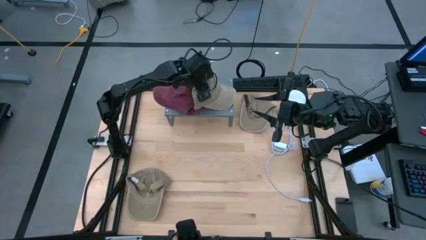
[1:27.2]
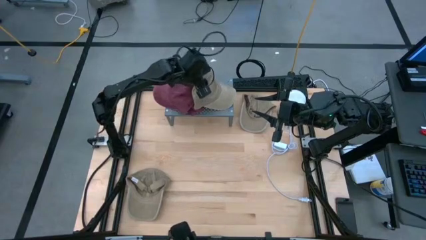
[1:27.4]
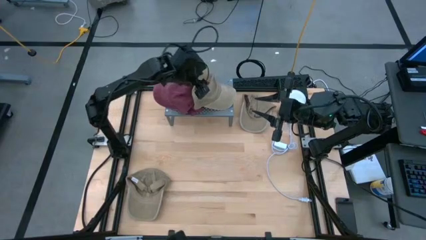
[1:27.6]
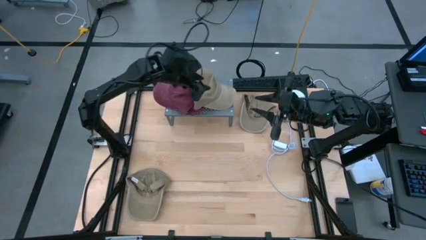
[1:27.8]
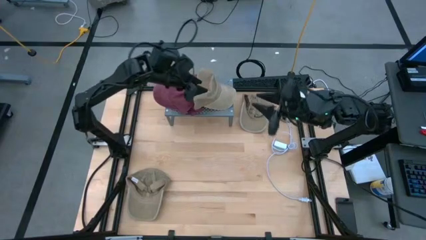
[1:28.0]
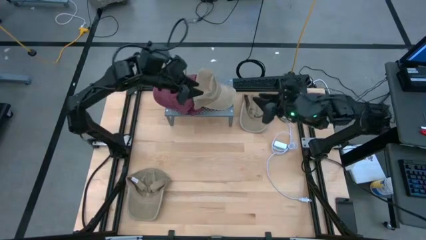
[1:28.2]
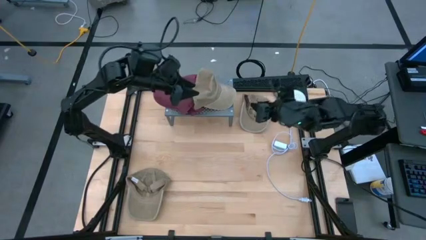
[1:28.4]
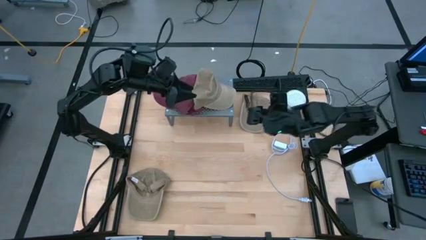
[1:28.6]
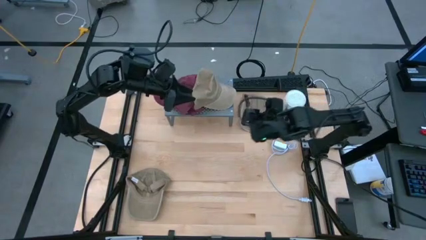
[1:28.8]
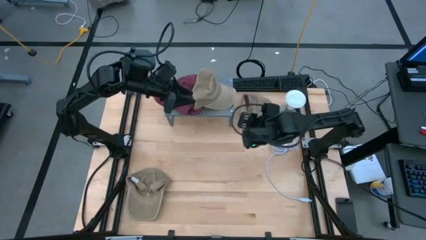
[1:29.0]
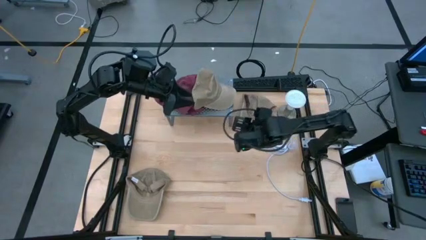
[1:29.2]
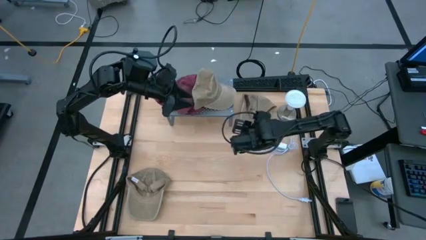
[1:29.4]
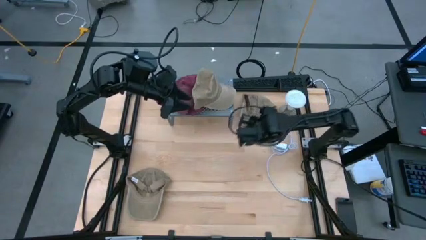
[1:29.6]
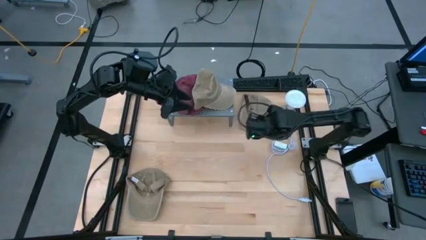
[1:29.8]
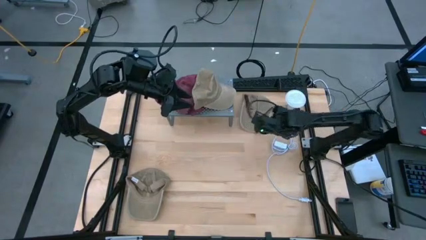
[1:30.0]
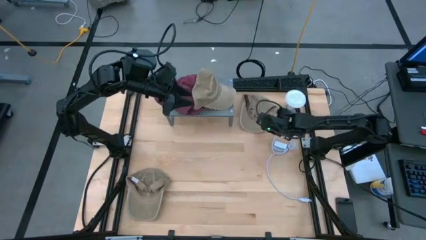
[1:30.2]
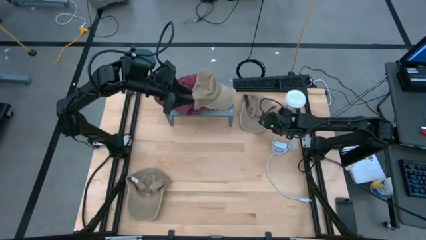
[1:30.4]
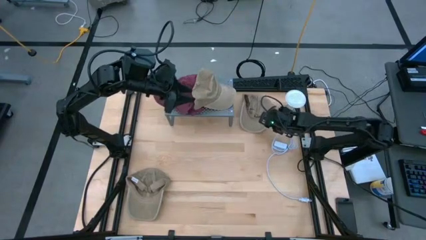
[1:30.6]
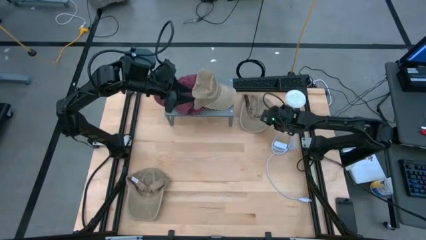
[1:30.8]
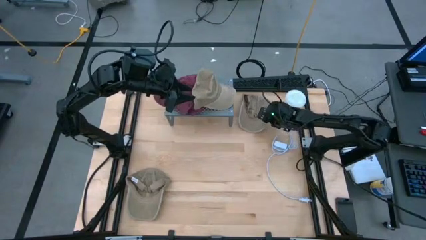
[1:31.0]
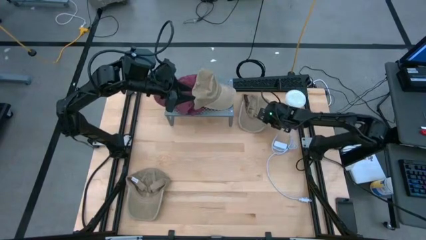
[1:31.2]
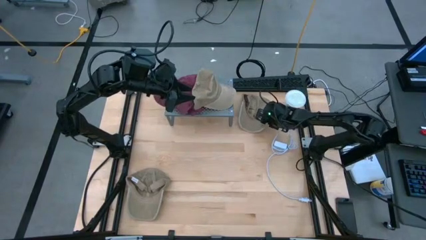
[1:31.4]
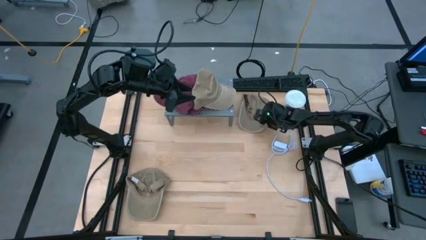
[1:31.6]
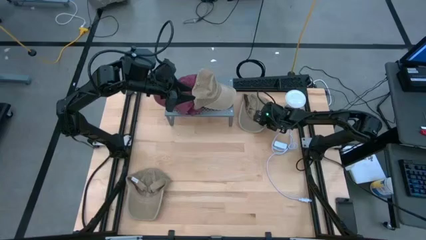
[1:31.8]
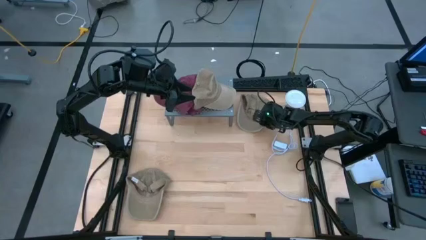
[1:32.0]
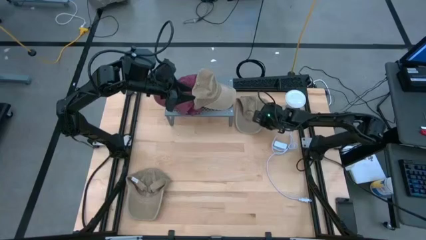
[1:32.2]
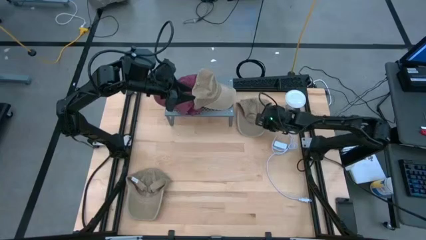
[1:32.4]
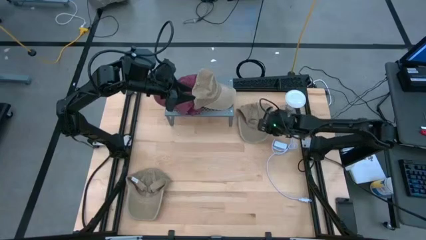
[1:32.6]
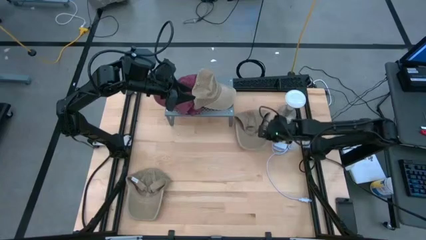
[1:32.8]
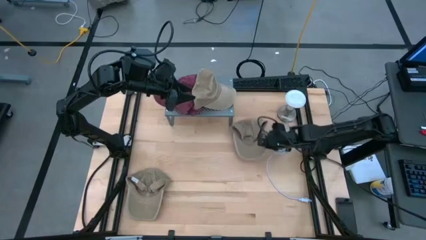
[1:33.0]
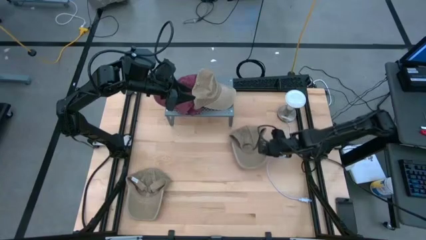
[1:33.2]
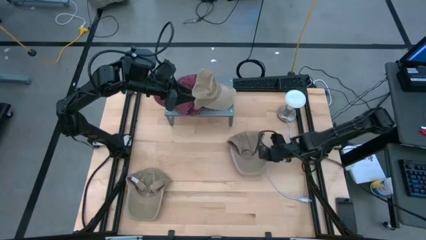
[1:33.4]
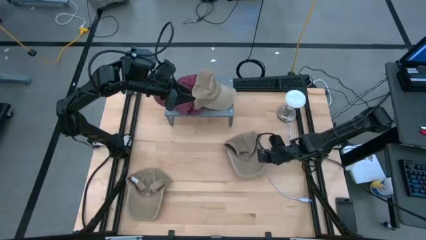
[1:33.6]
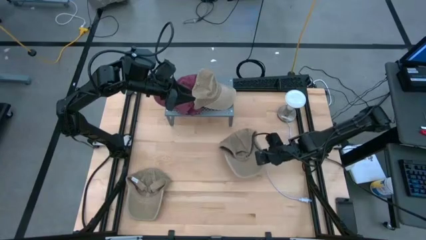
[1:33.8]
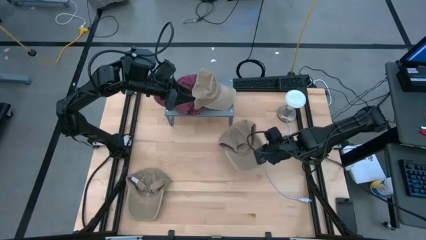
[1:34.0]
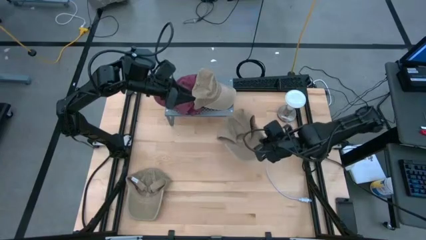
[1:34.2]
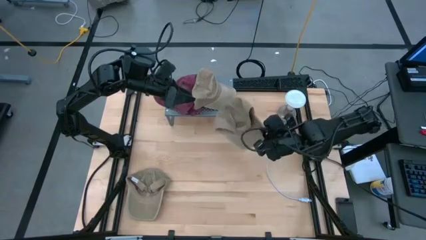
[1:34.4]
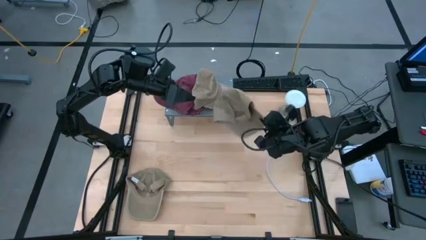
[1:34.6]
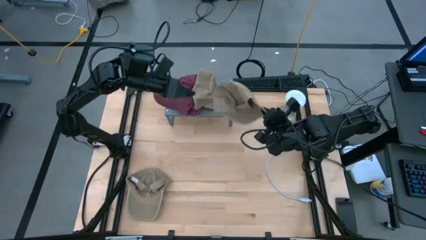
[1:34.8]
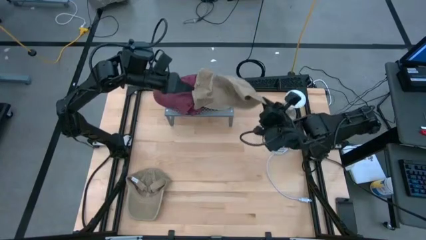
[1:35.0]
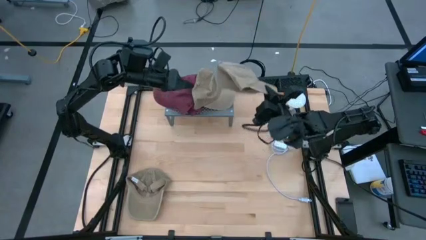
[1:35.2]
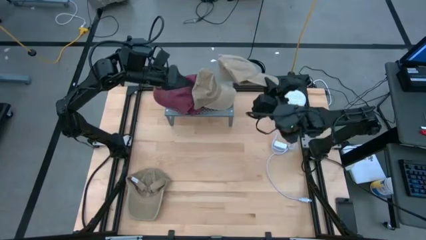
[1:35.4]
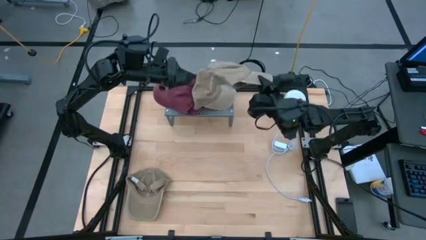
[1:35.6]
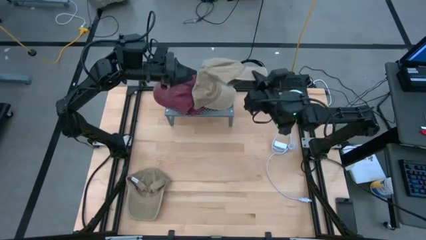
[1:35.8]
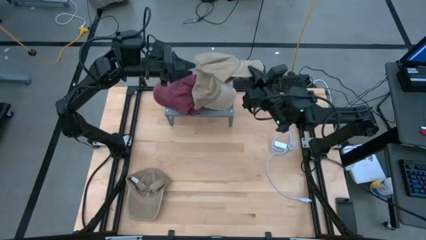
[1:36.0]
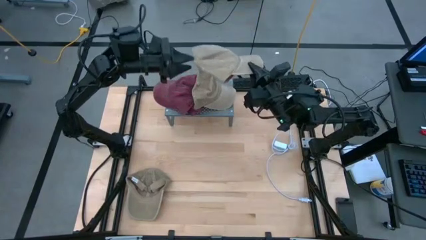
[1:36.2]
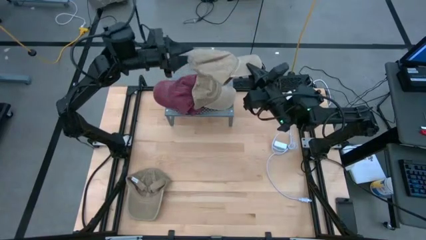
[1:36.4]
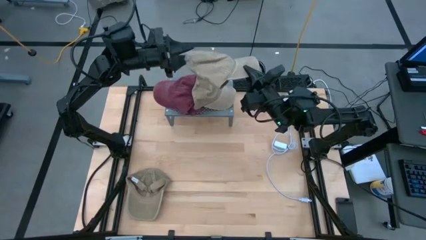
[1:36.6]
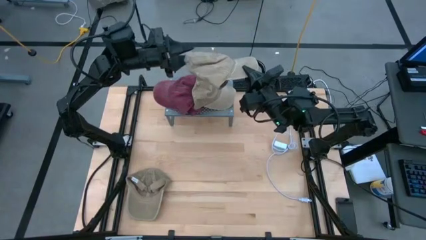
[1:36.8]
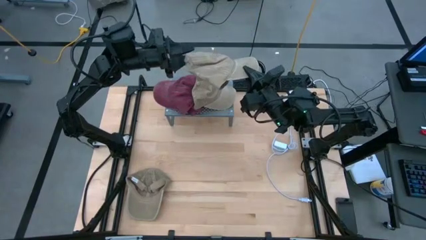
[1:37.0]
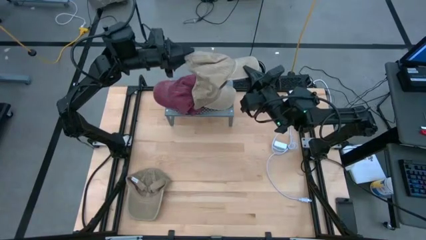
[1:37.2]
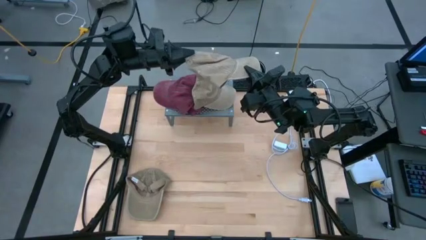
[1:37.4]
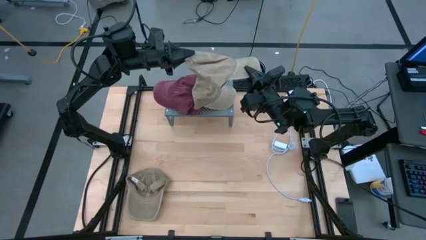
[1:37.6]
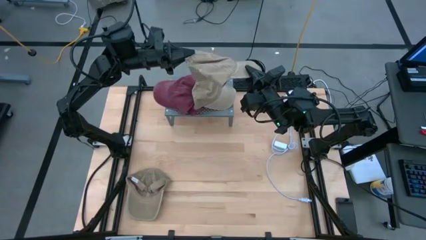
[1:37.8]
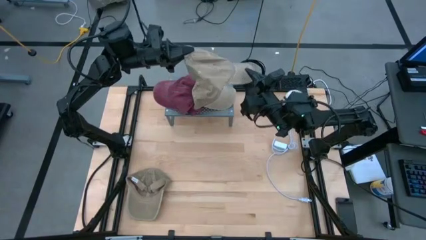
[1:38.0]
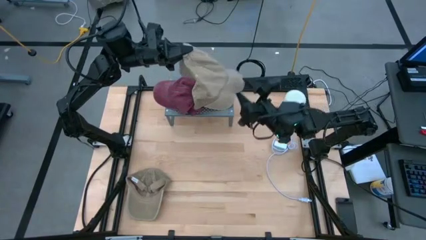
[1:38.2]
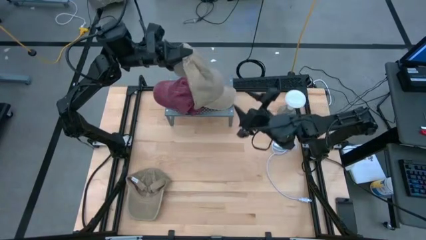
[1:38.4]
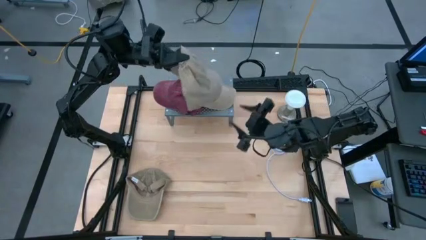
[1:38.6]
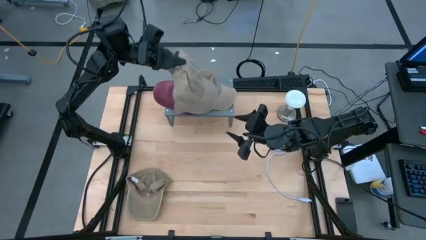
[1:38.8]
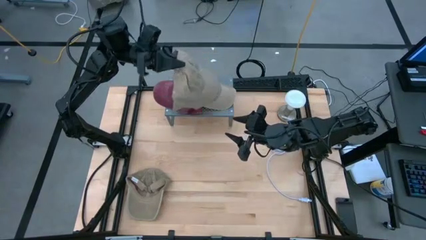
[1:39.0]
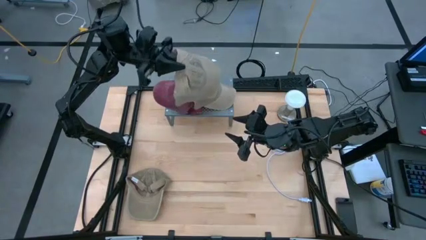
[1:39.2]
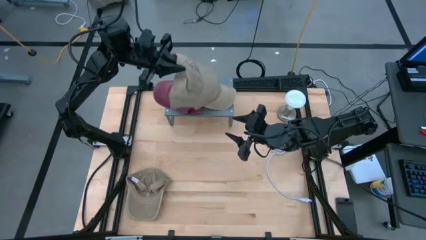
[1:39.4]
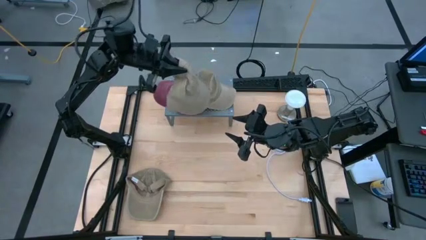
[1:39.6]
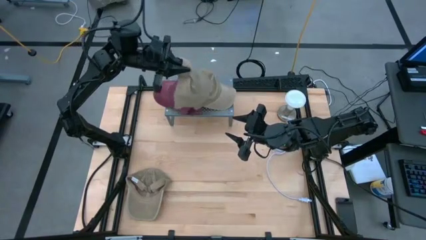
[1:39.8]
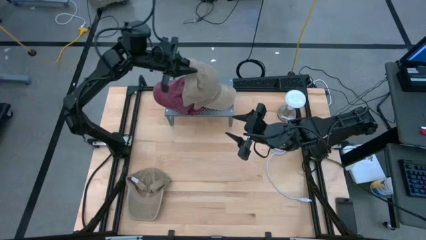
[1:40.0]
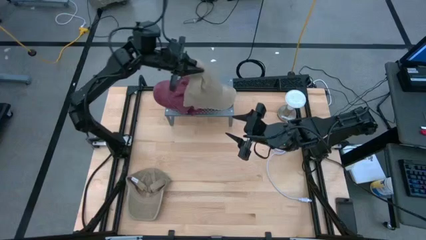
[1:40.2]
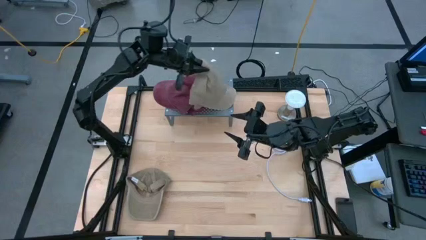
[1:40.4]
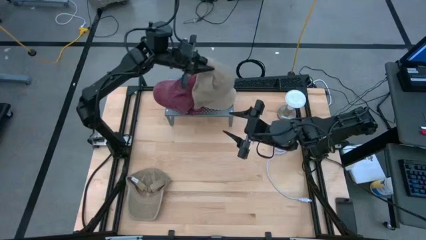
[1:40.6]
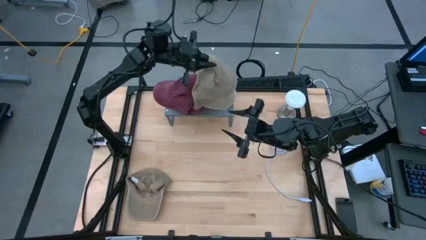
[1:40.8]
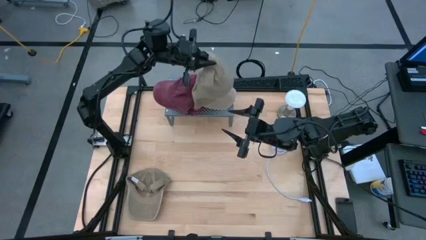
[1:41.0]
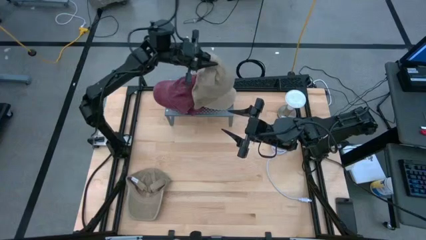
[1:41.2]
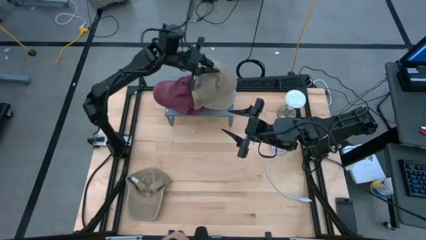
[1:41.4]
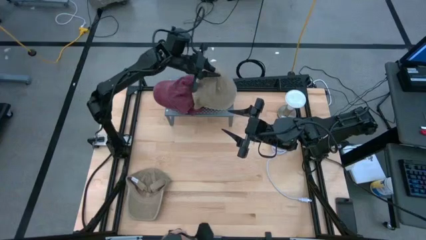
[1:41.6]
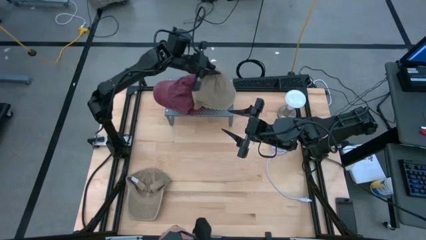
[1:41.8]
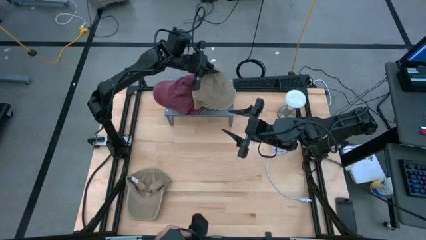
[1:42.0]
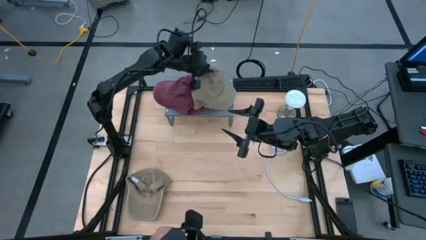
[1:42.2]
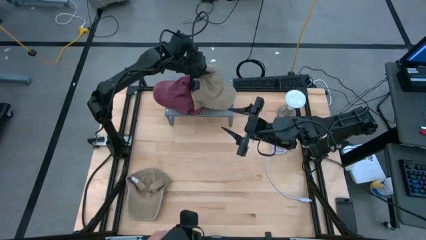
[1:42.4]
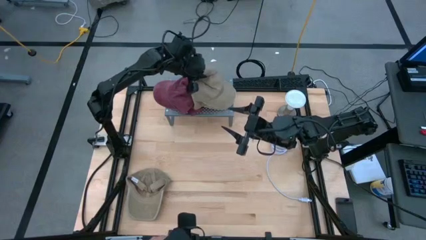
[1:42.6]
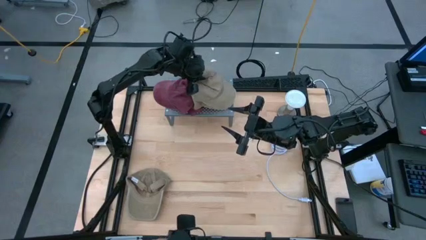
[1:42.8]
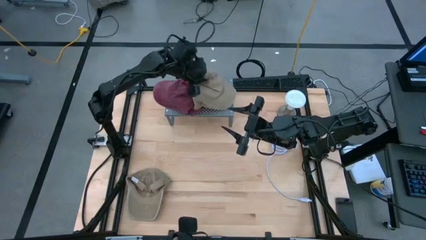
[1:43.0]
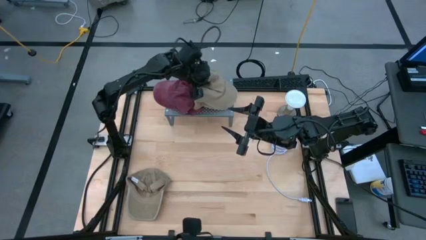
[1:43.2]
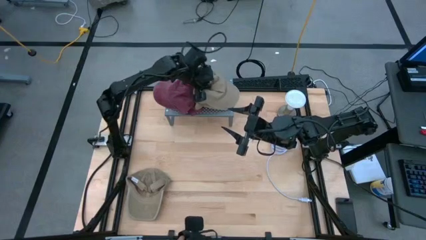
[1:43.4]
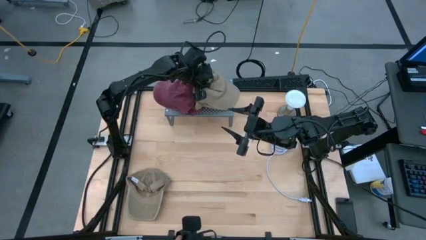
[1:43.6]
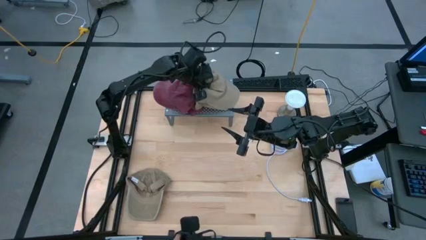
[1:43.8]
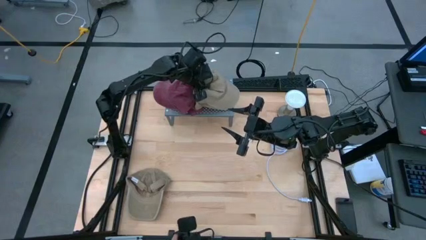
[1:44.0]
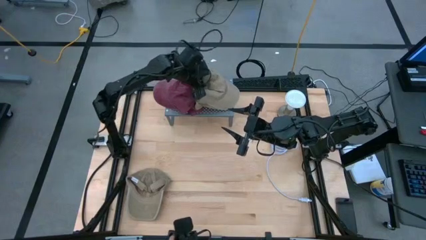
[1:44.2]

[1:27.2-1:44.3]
Task: Pick & Place hat
Stack the light brown cap on the light brown cap on the shelf
